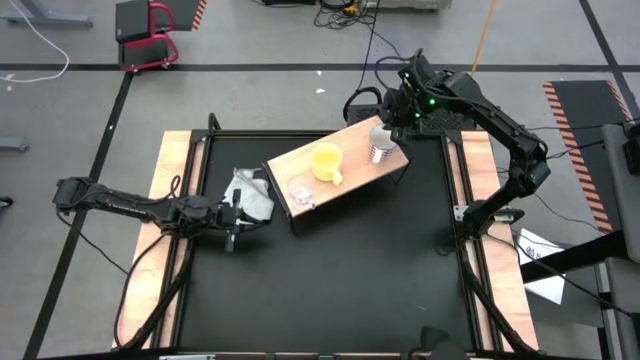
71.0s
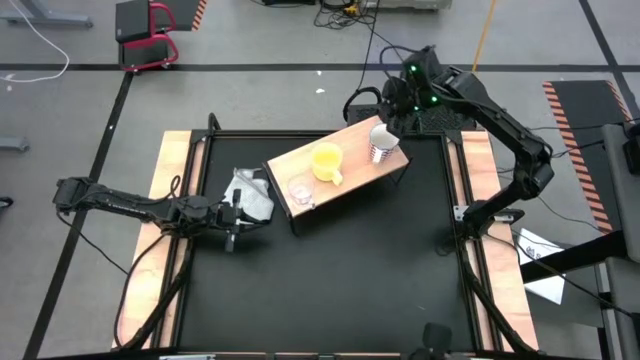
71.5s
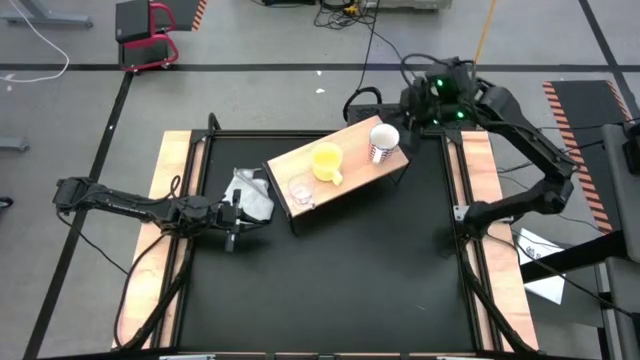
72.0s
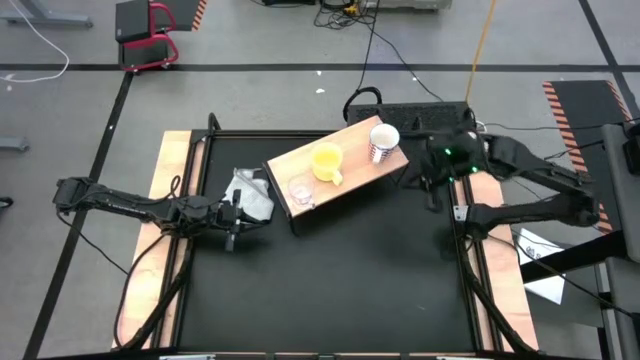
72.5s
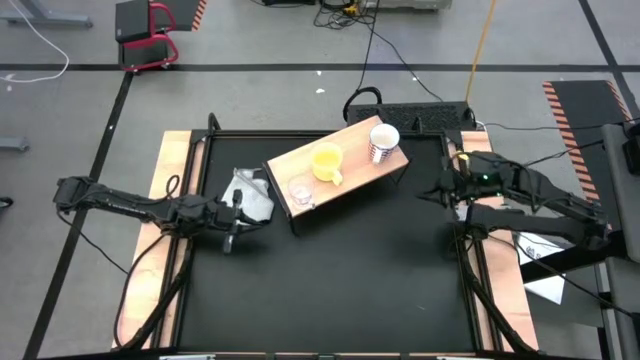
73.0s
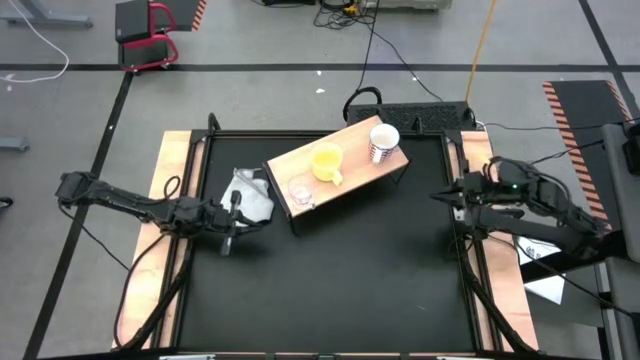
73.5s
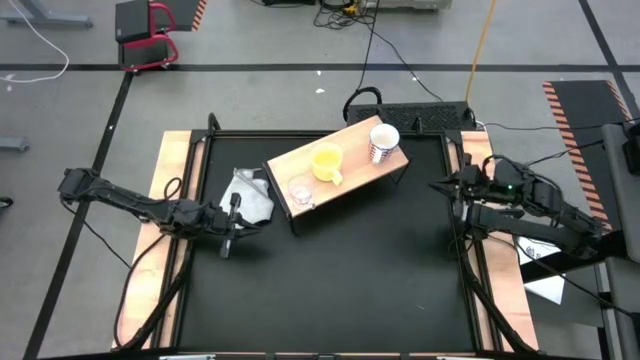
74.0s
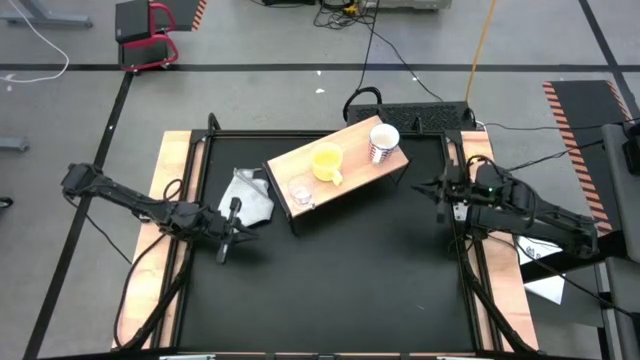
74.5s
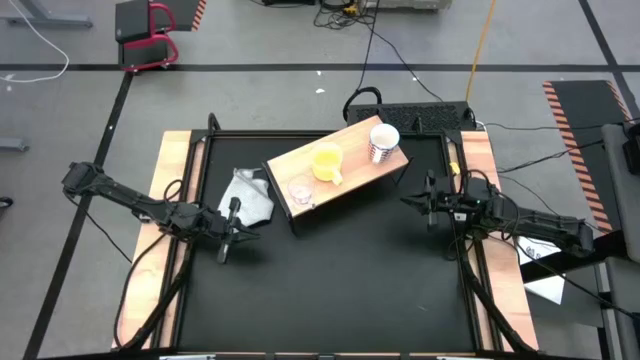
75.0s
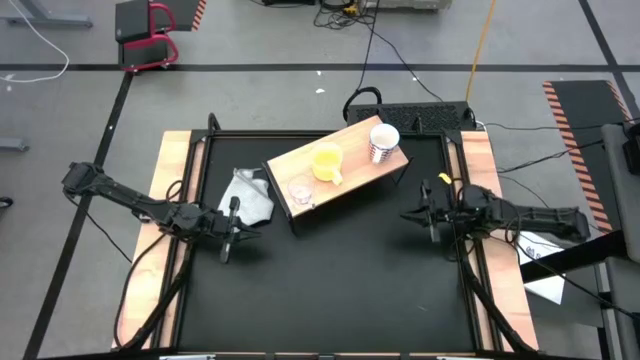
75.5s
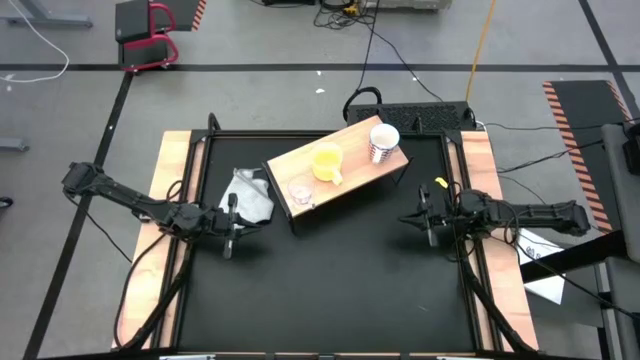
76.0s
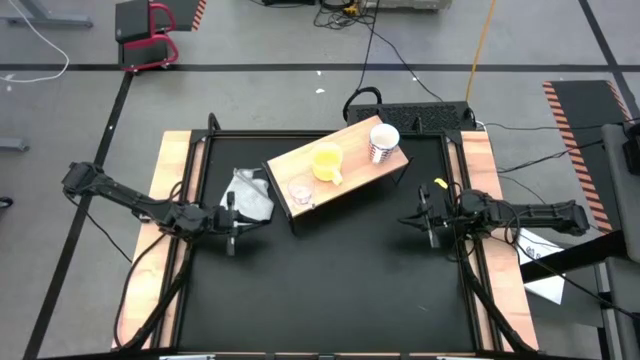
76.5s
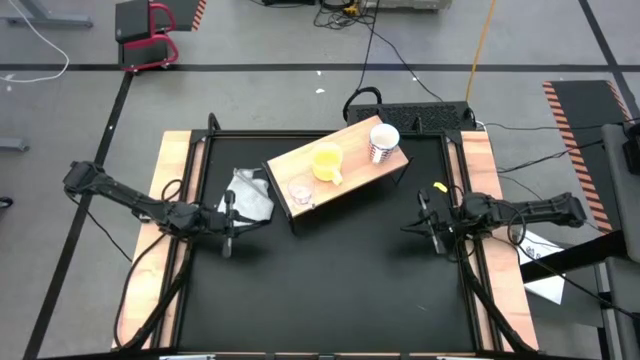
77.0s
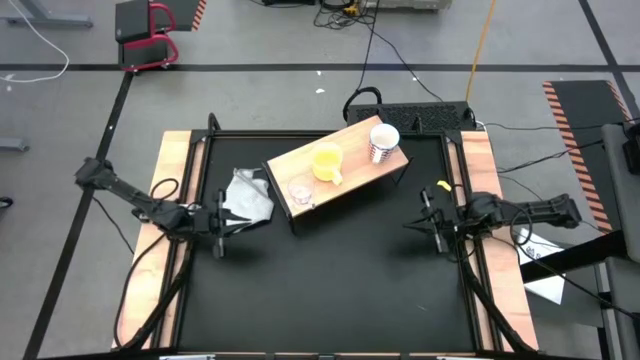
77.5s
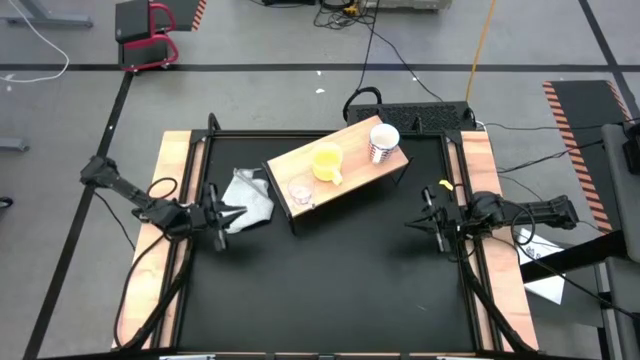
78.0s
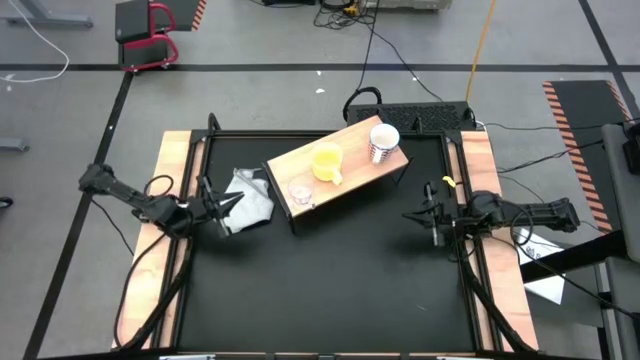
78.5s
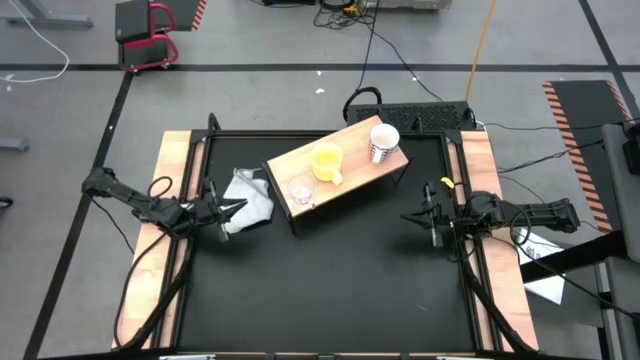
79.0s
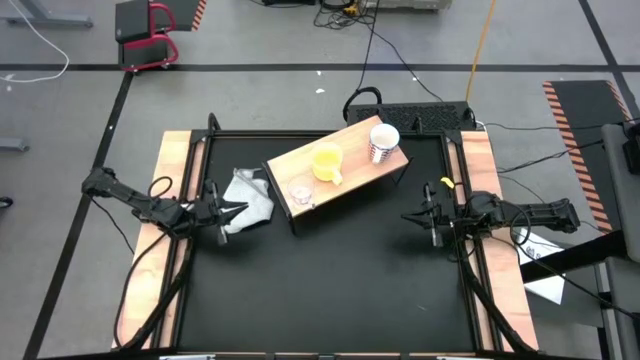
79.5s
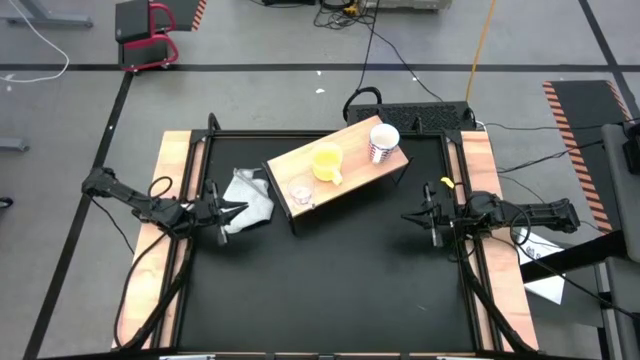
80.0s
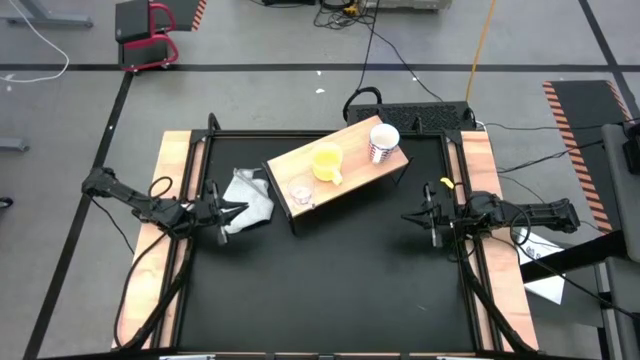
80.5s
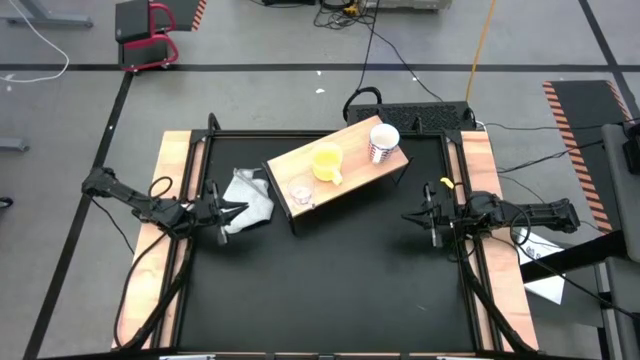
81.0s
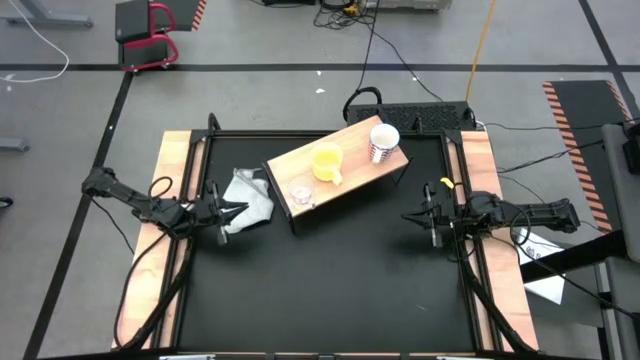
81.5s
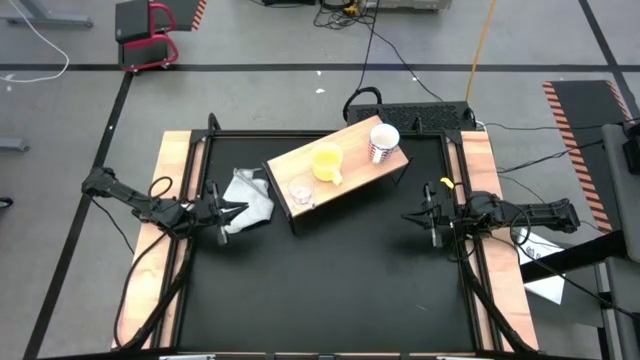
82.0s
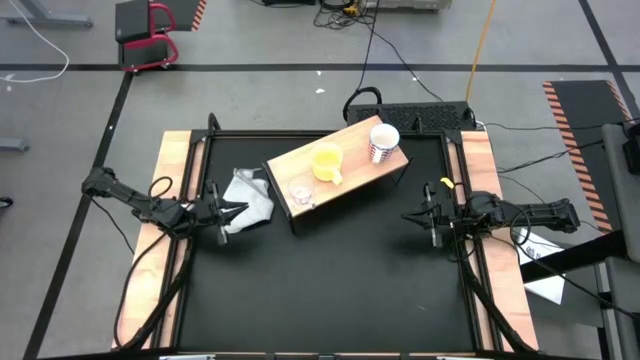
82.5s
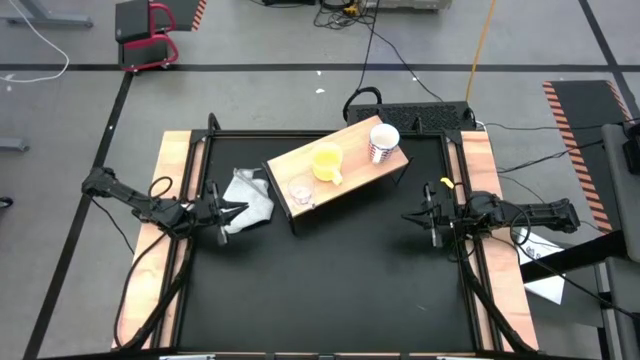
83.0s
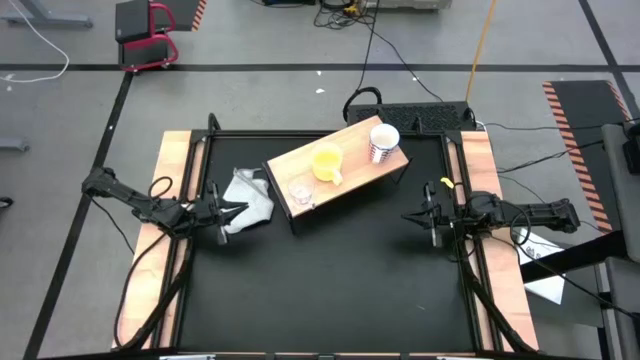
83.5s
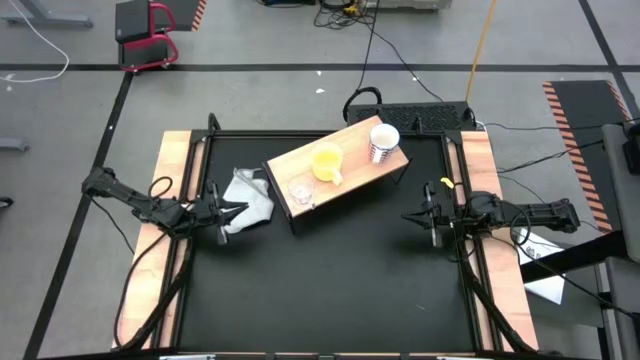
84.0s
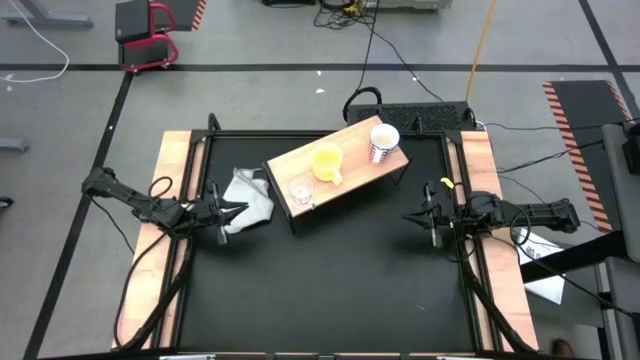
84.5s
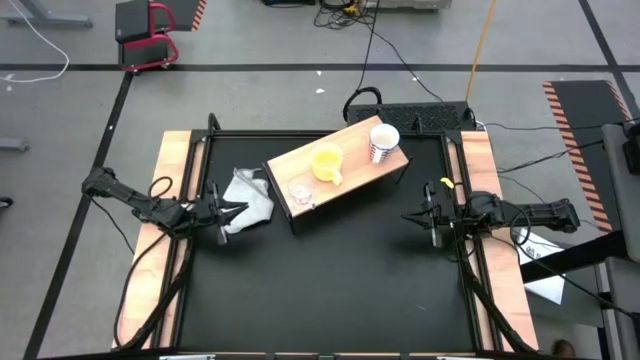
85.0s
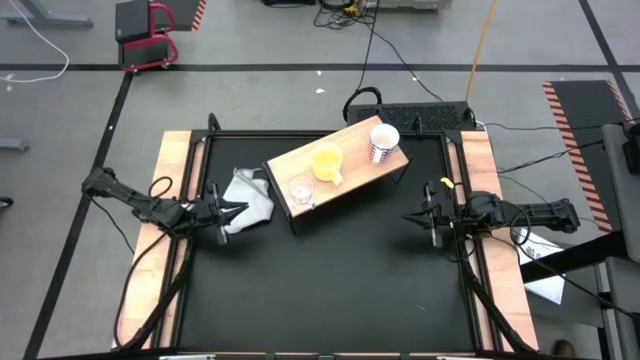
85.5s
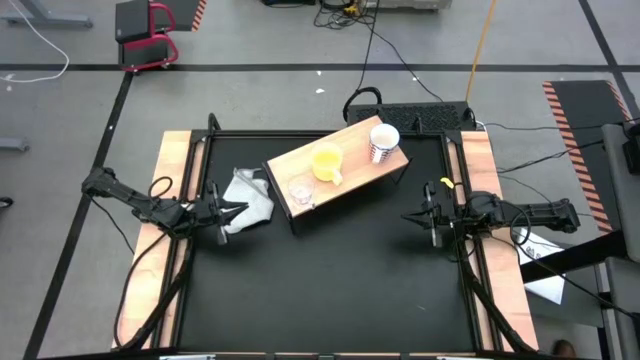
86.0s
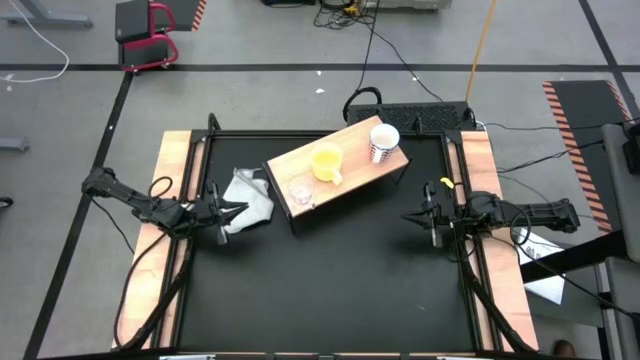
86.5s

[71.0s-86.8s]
Task: Stack small to large cups/mugs on shelf
Return to Home Position

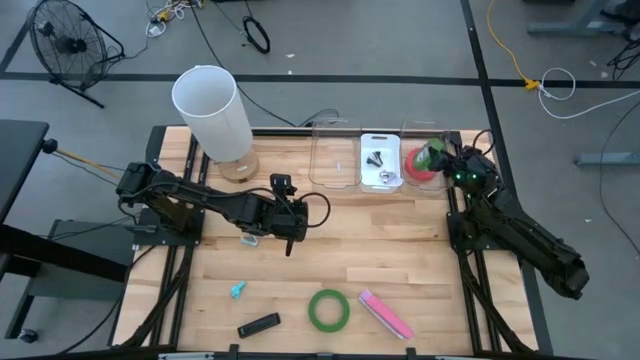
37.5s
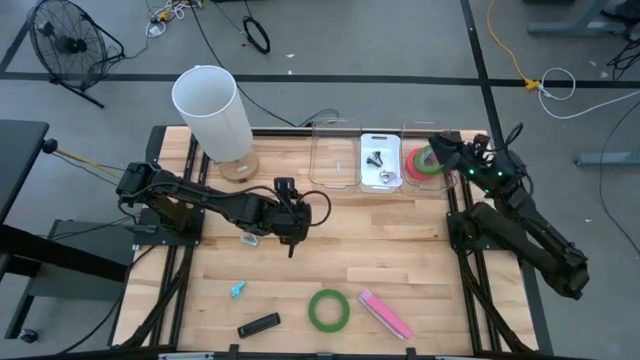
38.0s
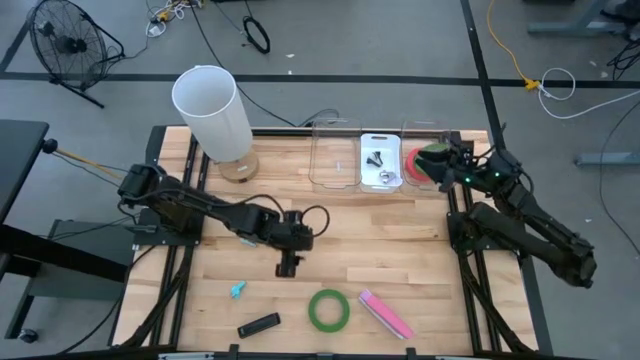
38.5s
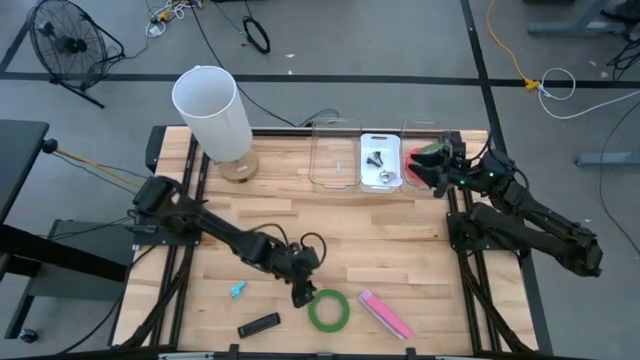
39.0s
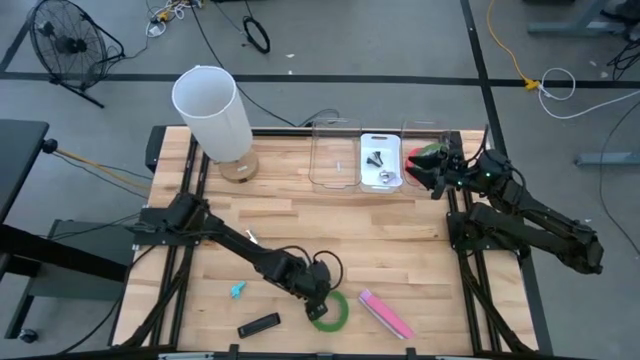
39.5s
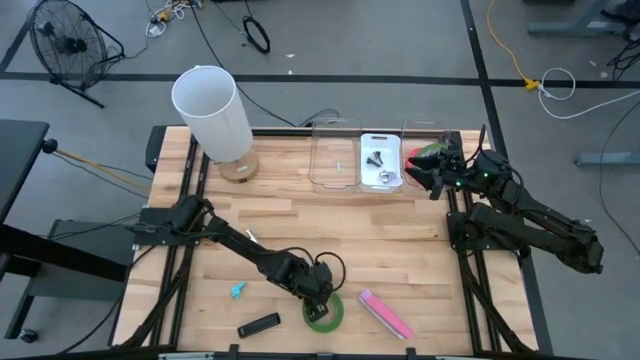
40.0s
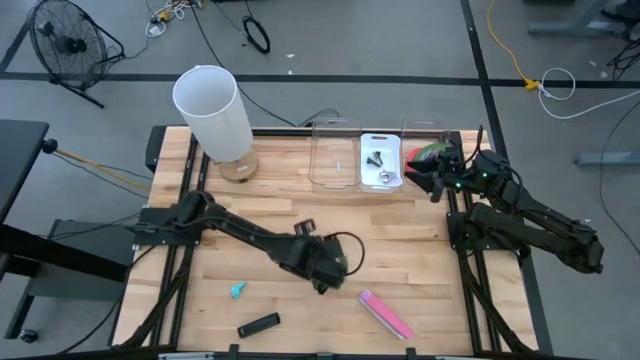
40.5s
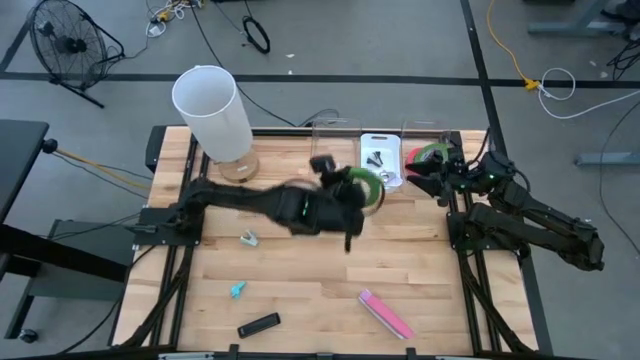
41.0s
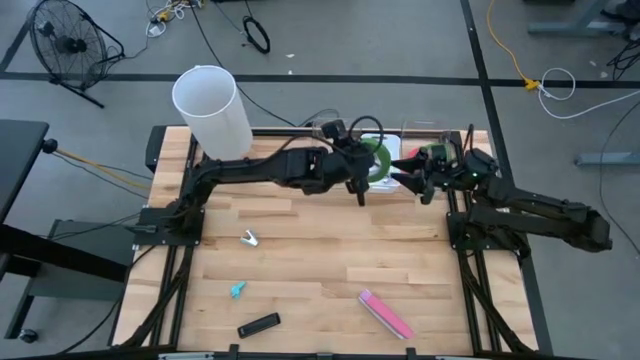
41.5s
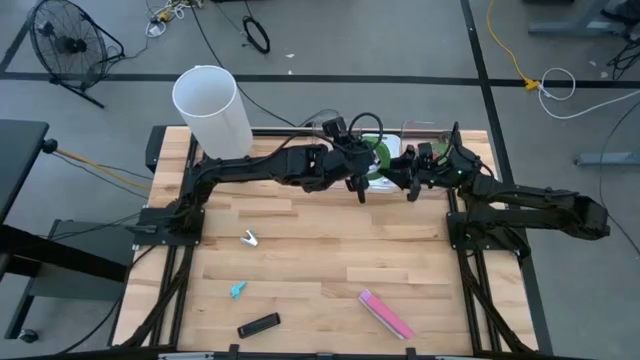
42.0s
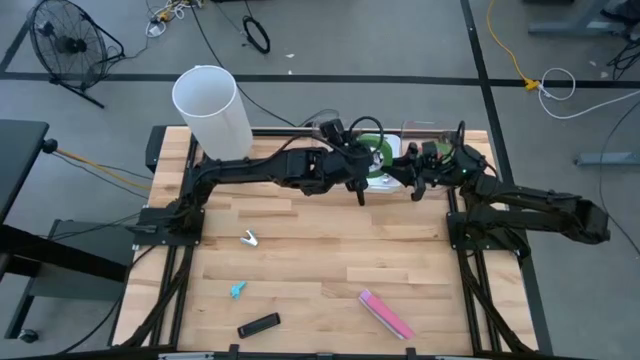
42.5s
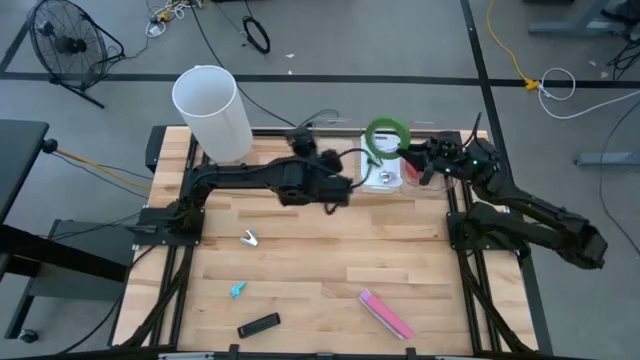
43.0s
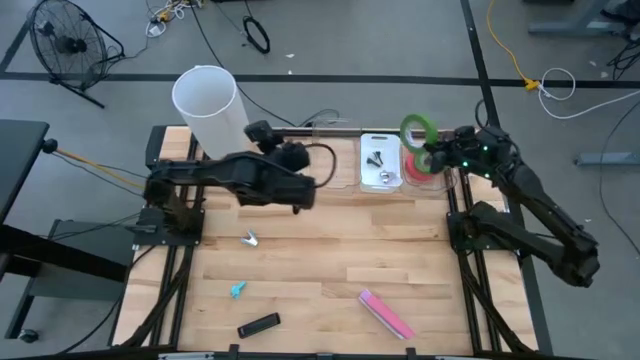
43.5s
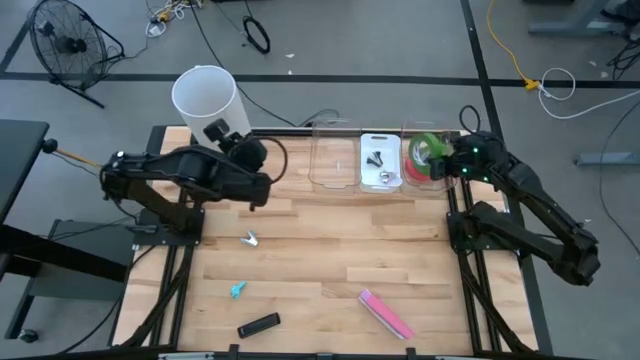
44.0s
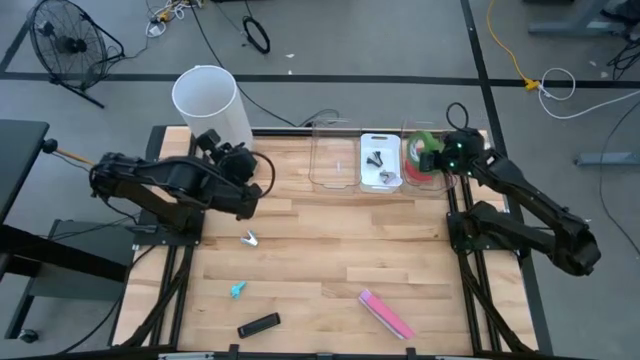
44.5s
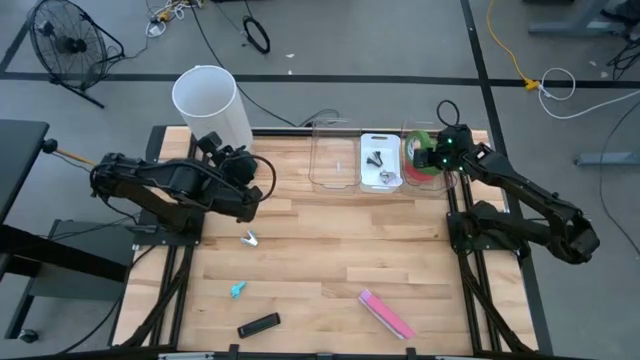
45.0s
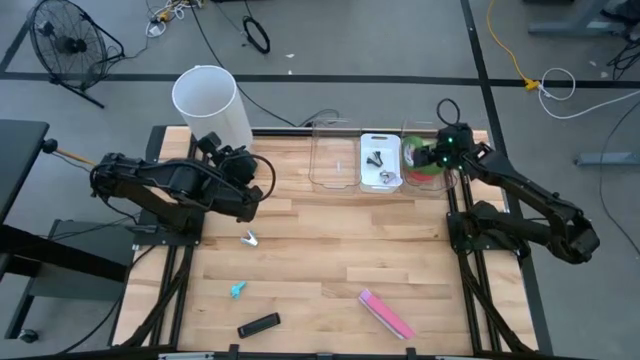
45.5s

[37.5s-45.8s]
Task: Pick and place Stapler, Stapler remover, tape
Put the green tape into the right transparent bin
